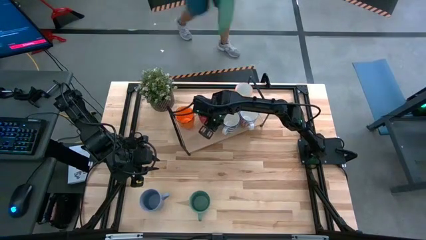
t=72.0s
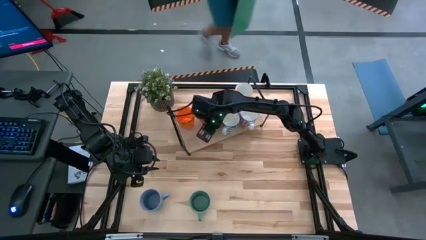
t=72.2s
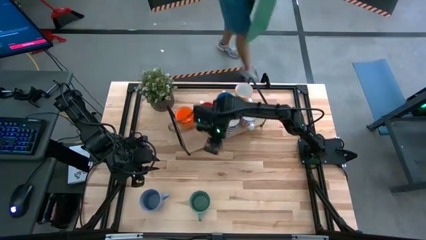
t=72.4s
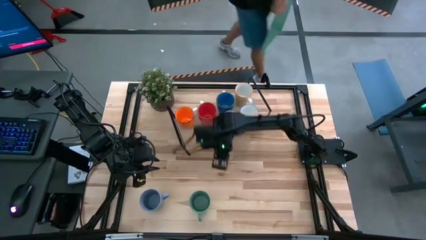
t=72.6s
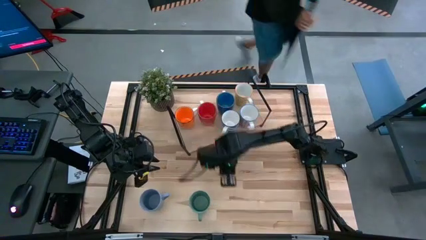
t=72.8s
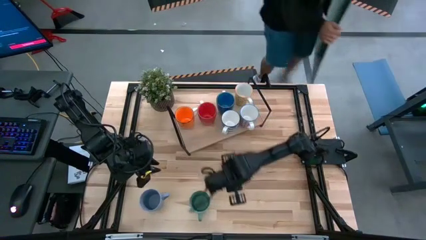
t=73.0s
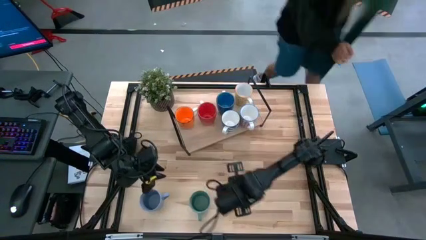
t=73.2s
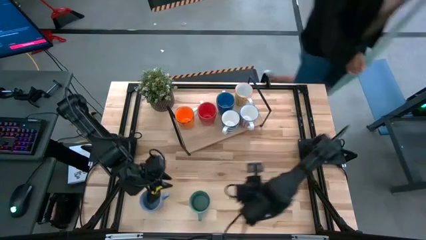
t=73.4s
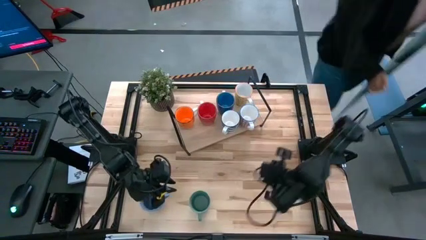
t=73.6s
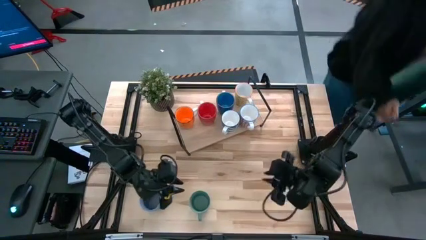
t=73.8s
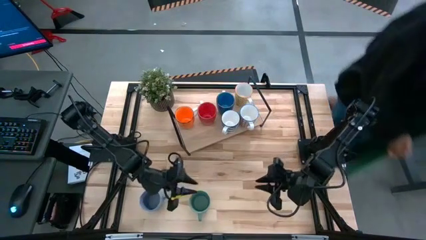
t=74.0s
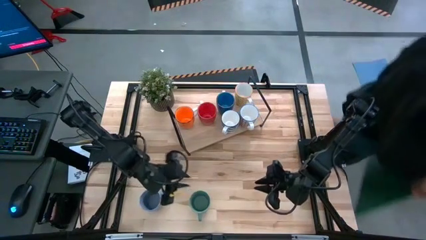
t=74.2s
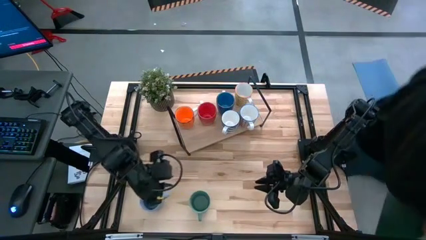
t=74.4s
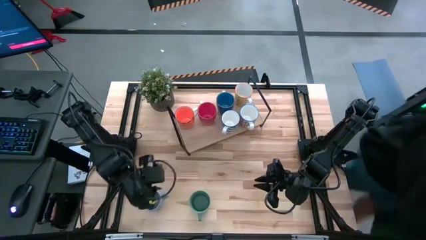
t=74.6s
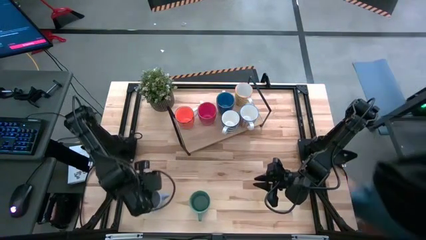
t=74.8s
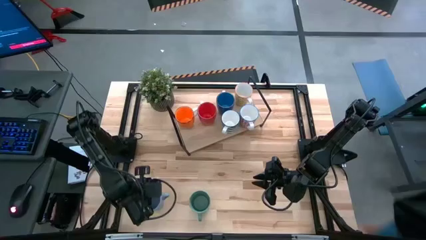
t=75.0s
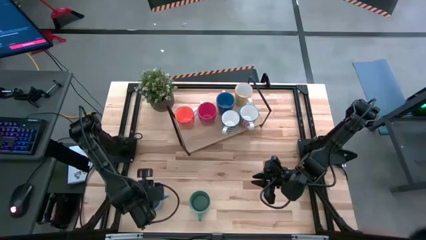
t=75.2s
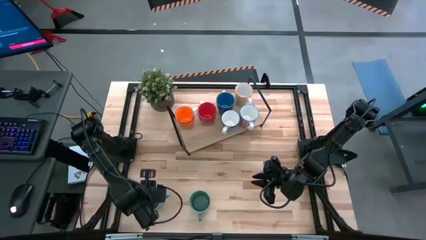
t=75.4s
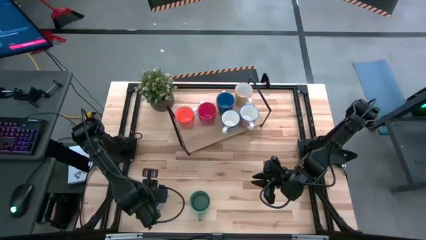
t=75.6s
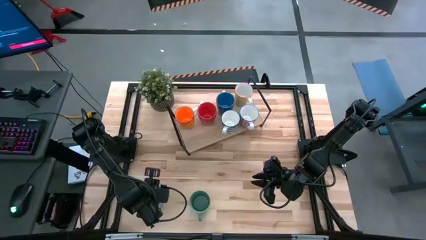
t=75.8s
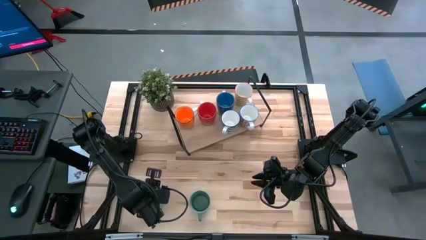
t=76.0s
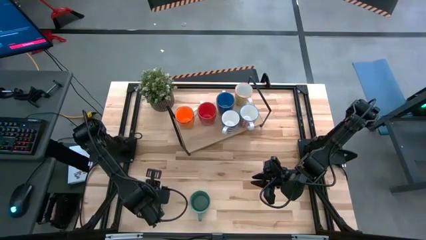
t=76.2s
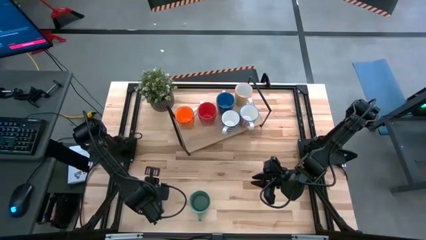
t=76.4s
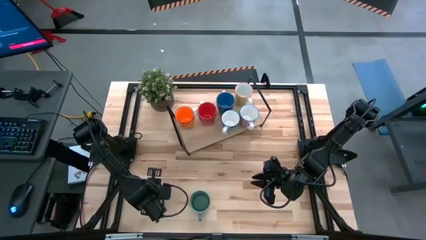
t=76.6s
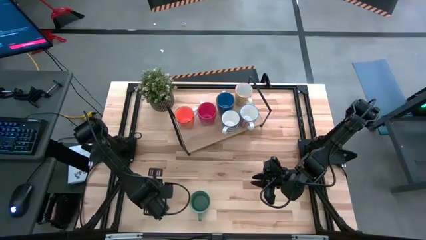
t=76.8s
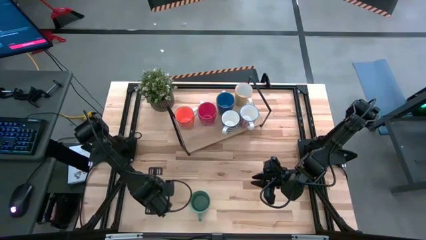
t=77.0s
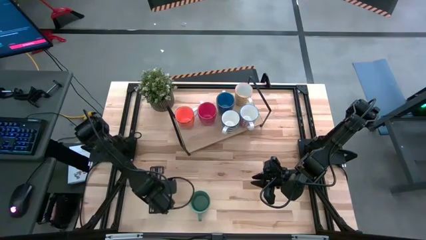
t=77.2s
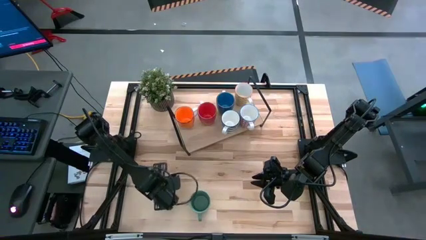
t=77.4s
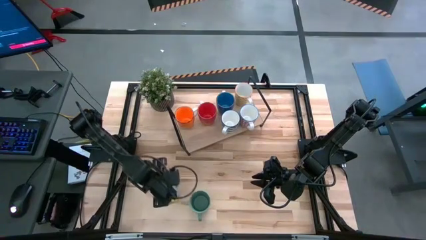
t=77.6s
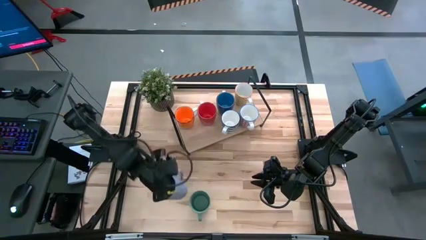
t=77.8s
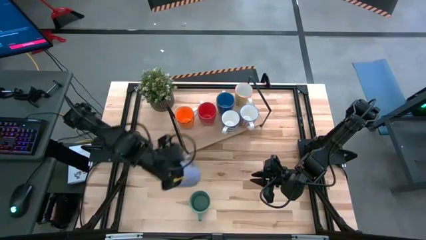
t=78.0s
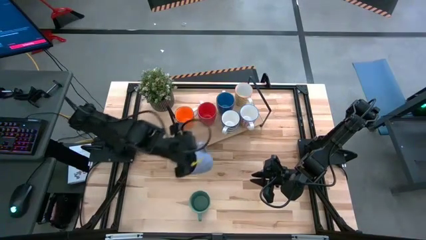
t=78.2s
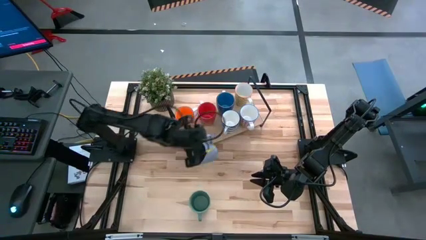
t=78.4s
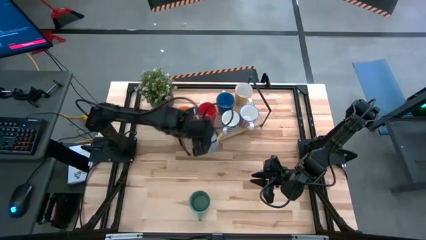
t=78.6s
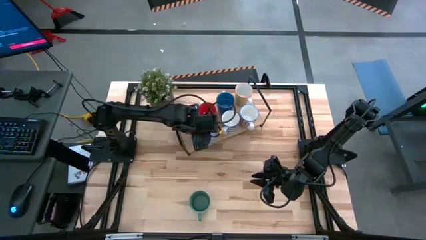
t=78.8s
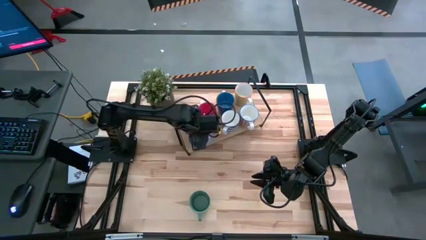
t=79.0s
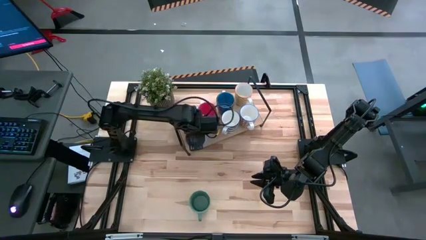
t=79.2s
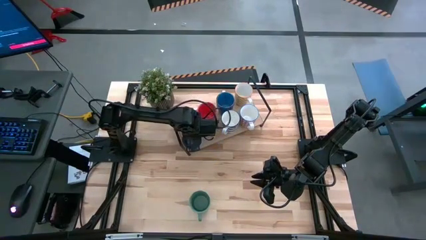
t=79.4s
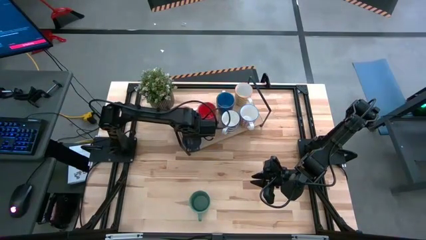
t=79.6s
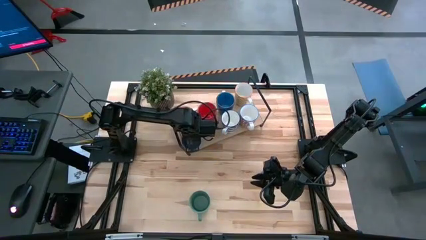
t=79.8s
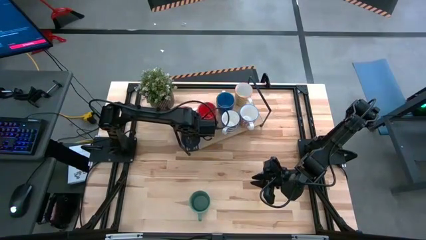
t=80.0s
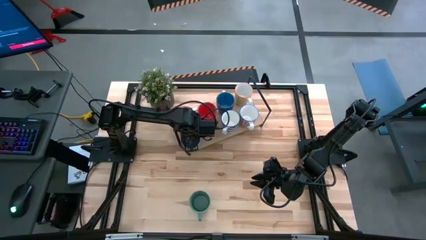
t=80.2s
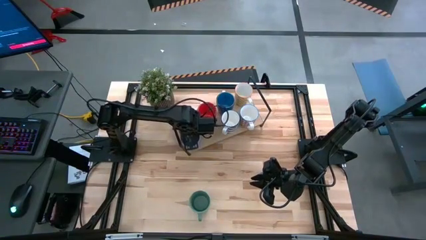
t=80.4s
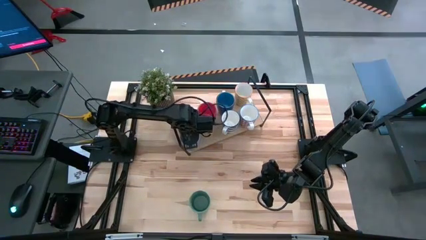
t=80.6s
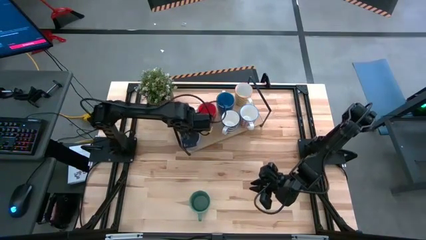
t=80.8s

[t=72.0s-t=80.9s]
Task: Place coffee mugs
Put the purple mug on the shelf

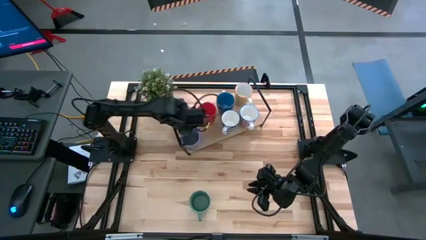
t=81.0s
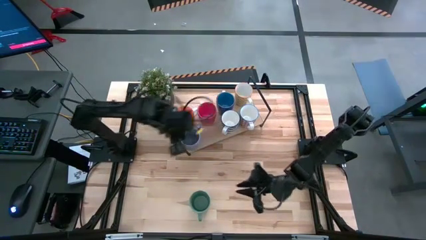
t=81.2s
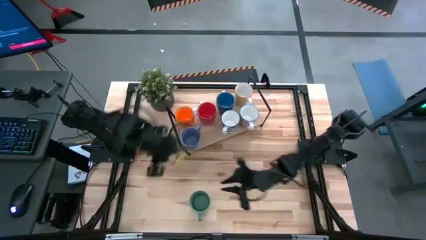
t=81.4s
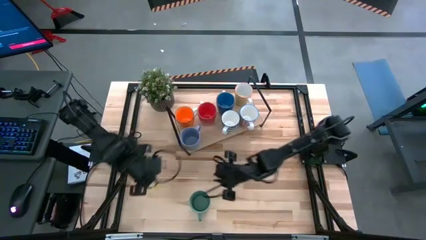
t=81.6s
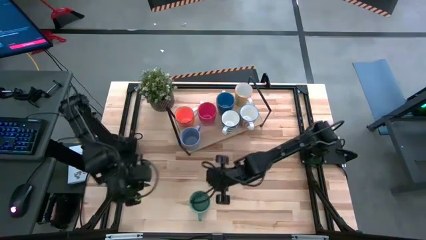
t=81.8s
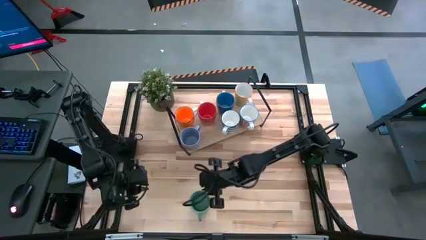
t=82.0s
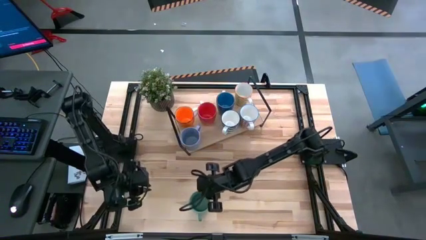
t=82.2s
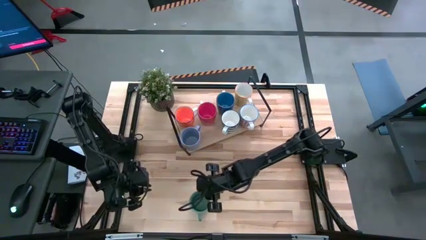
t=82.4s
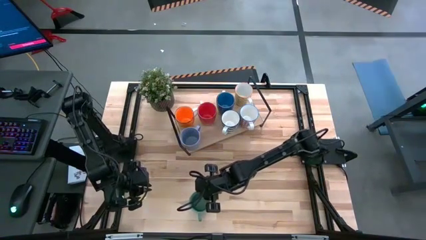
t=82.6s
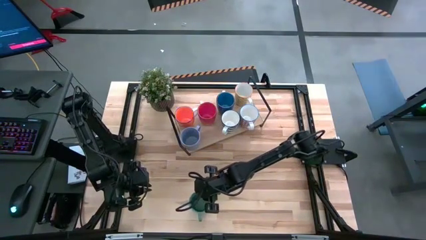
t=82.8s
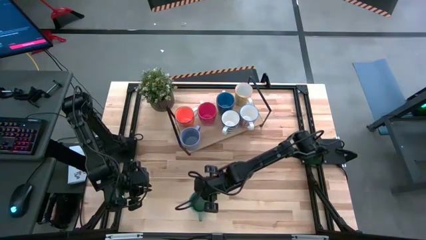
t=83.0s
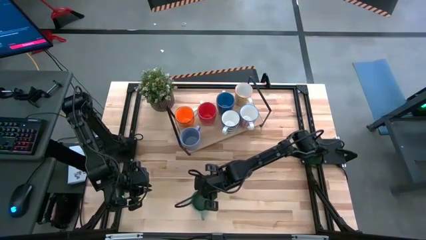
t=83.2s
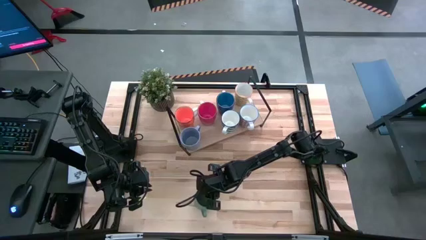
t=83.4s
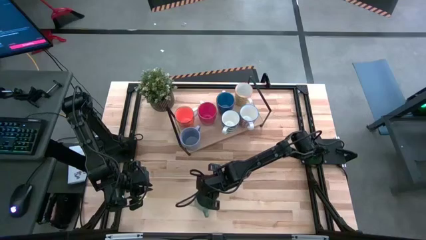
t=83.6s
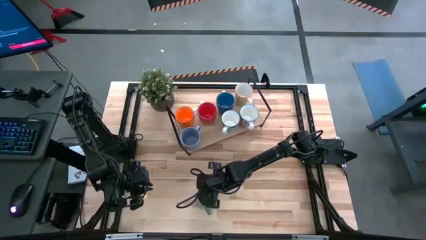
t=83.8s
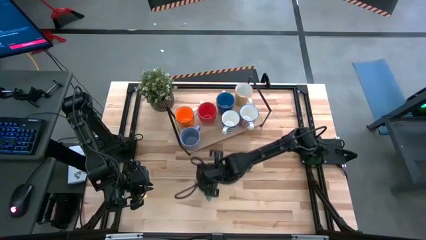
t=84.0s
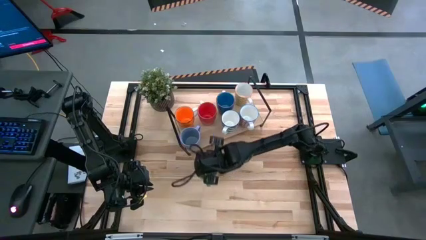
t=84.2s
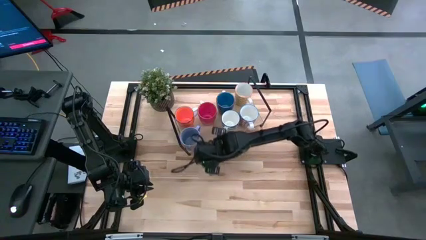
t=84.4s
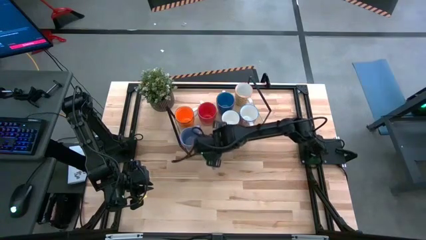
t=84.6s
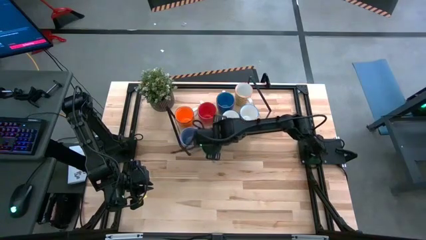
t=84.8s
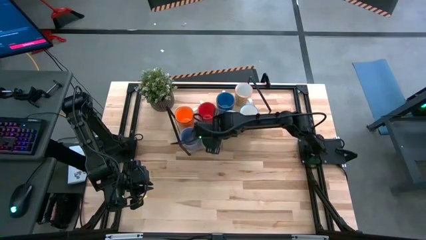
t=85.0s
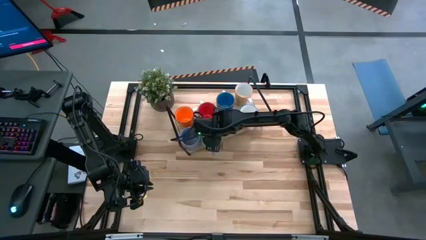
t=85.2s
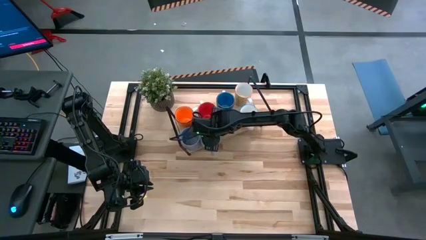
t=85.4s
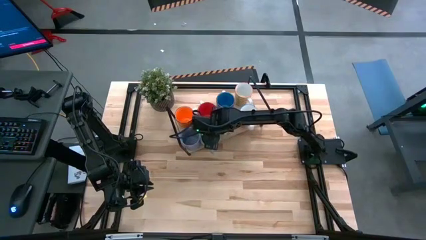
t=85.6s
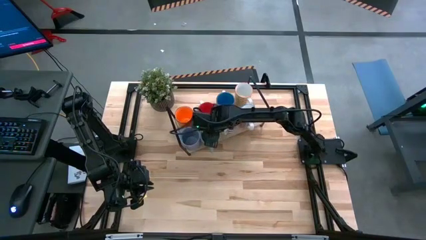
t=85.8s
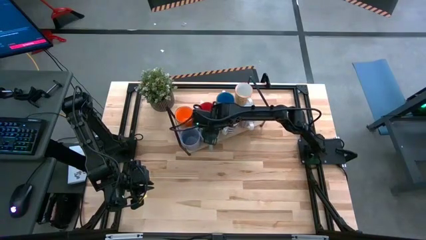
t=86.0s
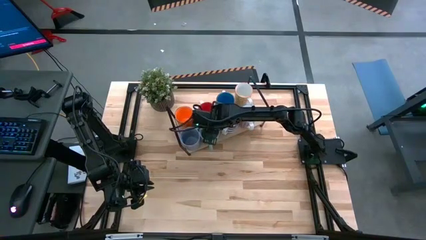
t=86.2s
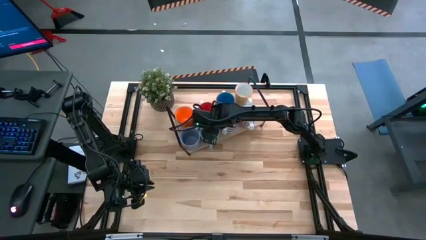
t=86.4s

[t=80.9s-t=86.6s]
Put the green mug on the shelf

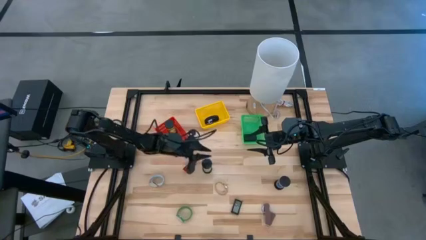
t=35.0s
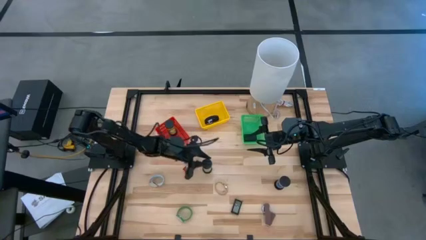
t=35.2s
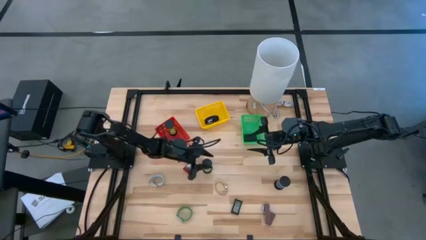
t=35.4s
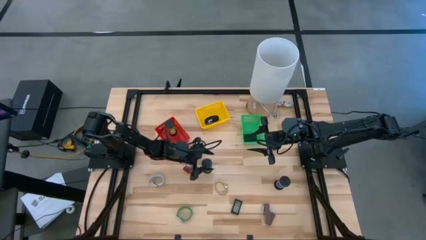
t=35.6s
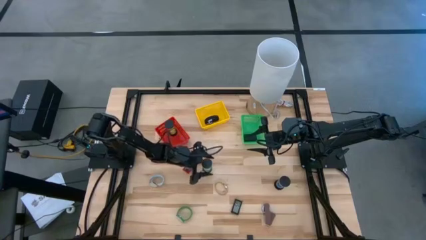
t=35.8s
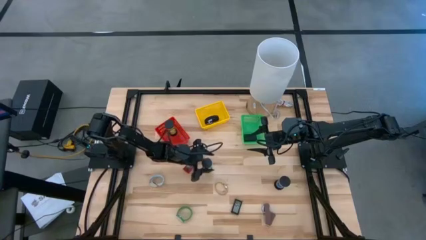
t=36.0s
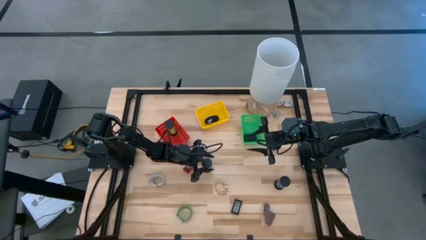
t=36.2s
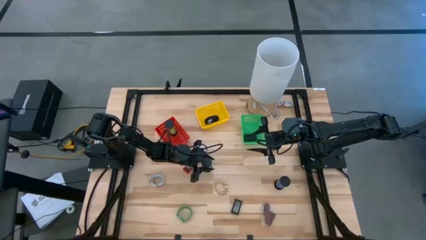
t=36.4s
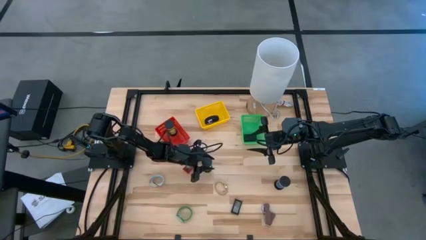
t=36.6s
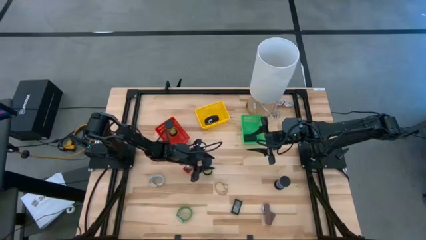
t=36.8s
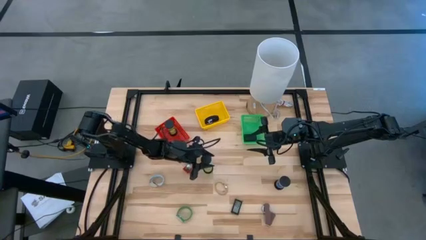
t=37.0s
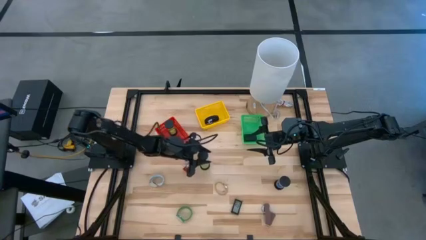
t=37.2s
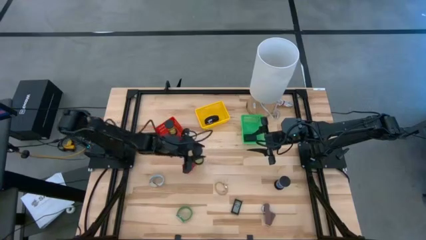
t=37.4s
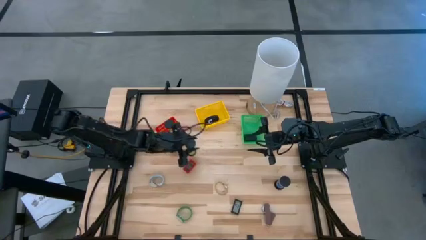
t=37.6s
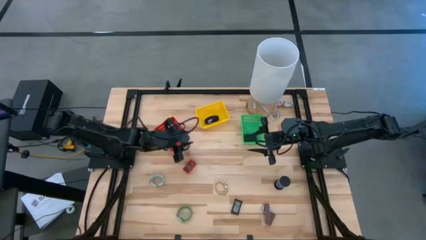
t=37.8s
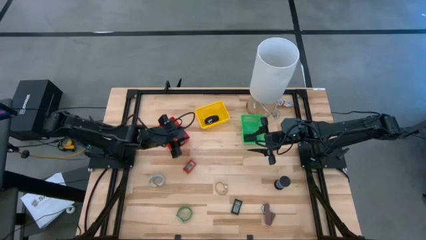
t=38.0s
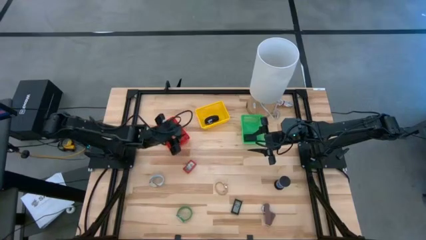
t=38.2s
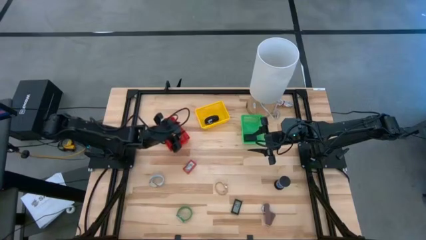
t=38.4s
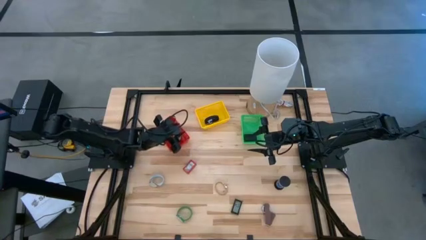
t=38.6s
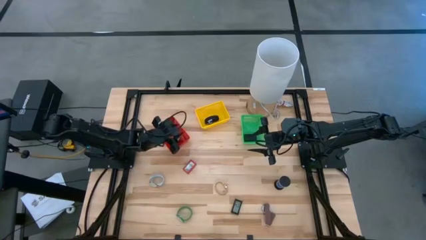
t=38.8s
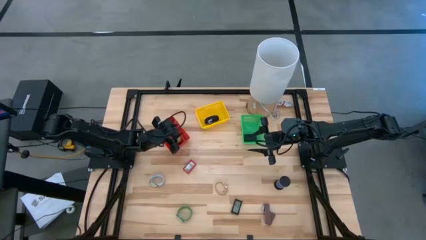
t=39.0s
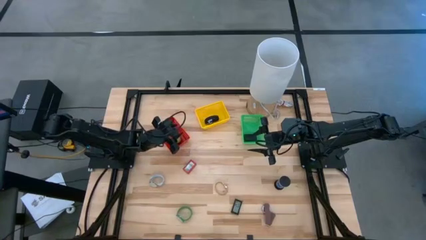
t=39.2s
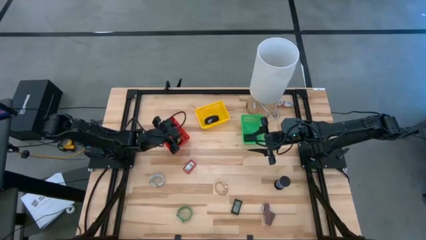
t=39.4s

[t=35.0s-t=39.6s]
Task: Pick & Place Office items
Put the left green hourglass into the red basket
